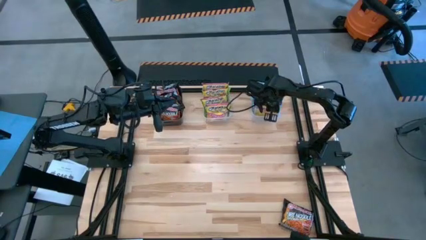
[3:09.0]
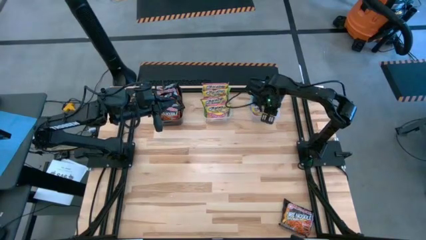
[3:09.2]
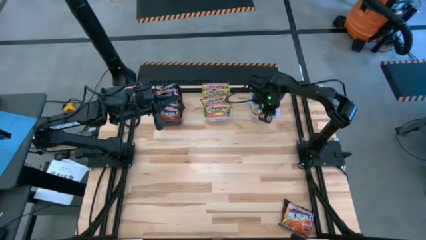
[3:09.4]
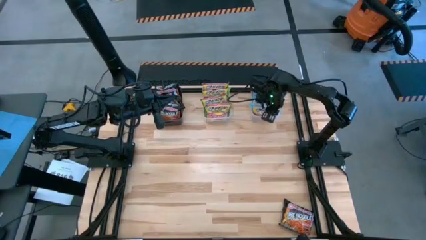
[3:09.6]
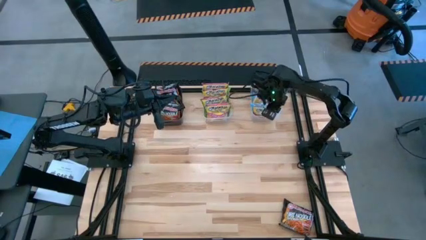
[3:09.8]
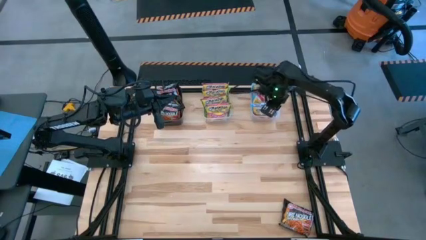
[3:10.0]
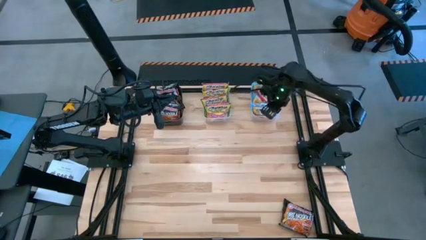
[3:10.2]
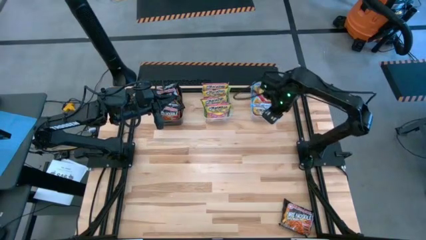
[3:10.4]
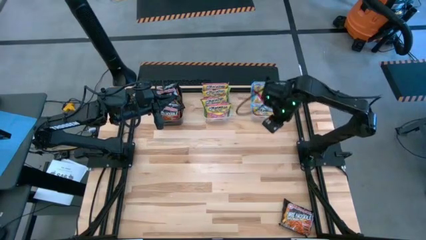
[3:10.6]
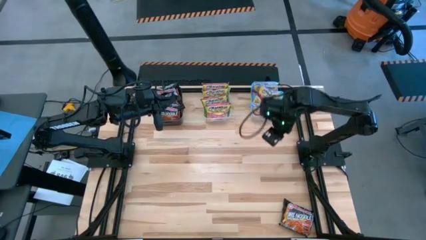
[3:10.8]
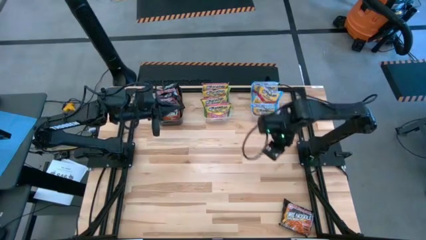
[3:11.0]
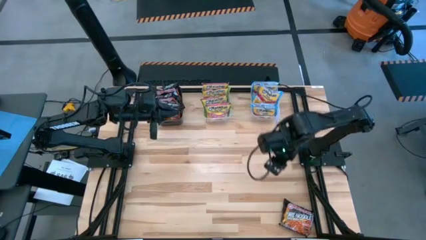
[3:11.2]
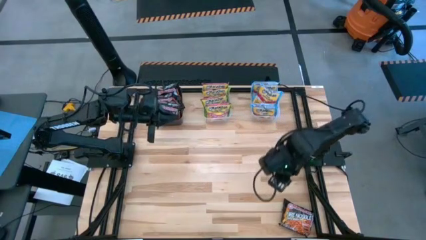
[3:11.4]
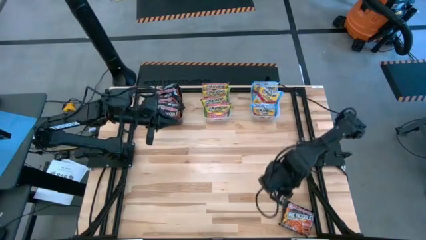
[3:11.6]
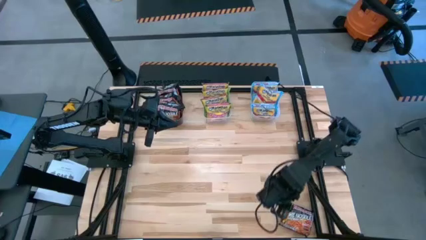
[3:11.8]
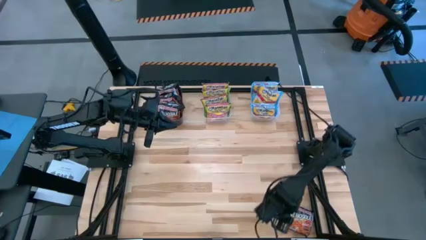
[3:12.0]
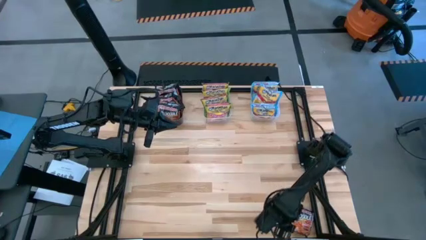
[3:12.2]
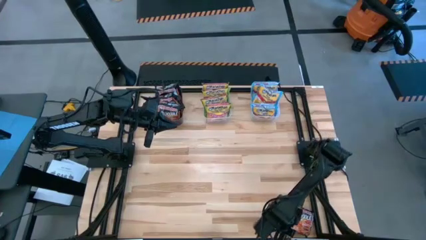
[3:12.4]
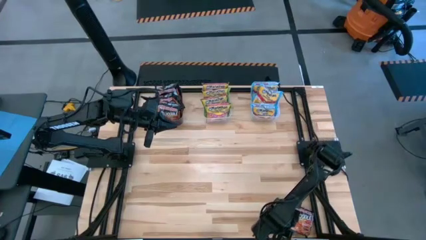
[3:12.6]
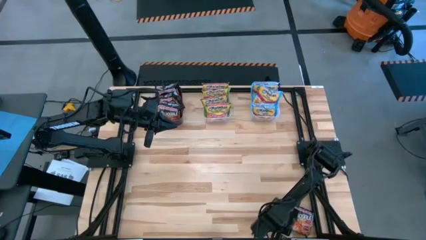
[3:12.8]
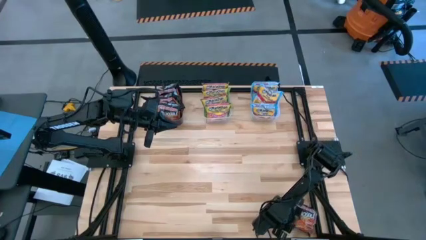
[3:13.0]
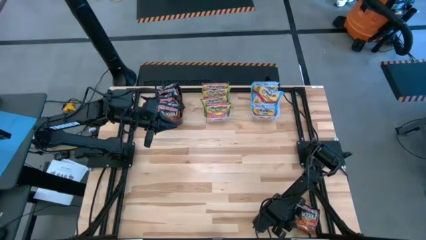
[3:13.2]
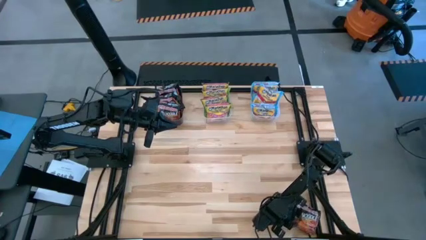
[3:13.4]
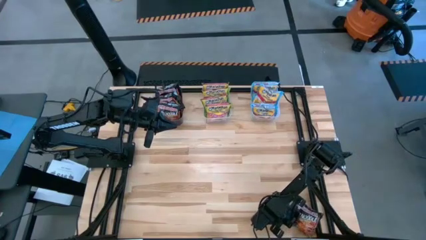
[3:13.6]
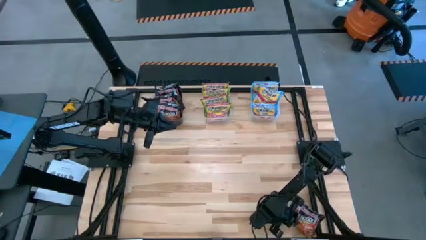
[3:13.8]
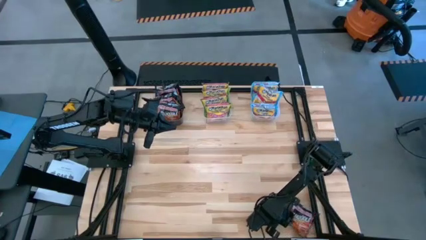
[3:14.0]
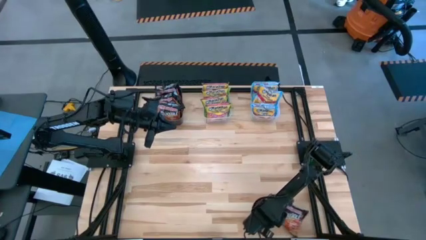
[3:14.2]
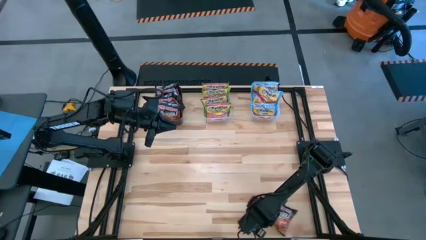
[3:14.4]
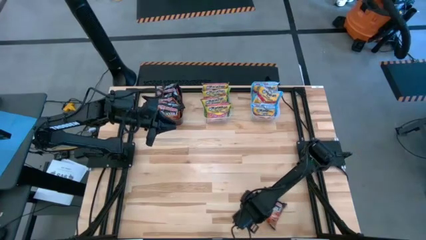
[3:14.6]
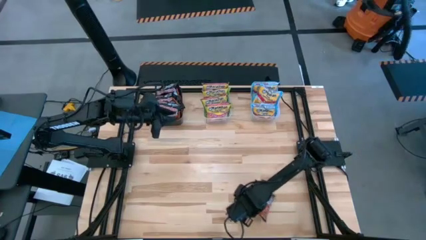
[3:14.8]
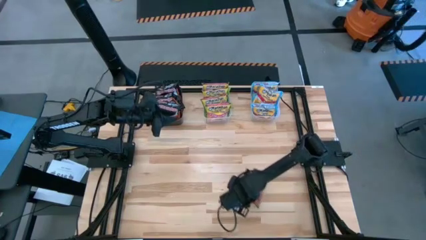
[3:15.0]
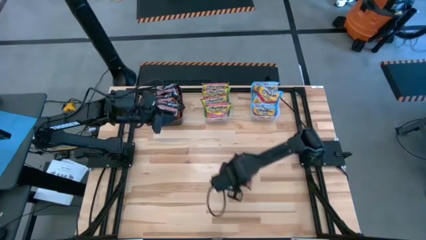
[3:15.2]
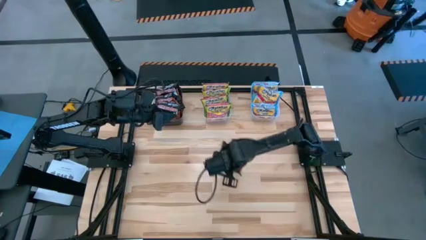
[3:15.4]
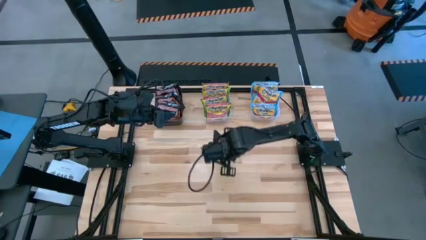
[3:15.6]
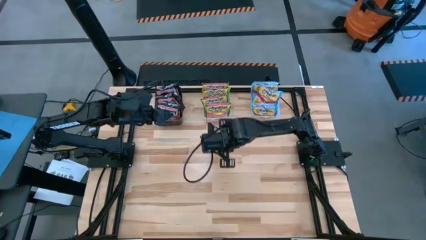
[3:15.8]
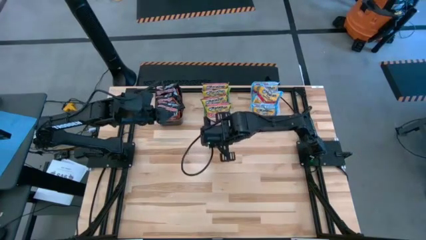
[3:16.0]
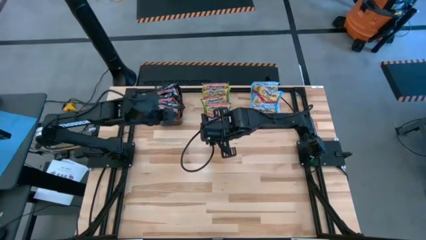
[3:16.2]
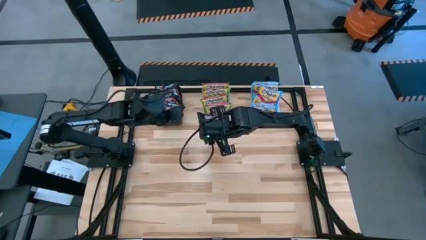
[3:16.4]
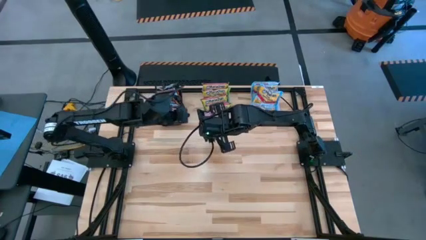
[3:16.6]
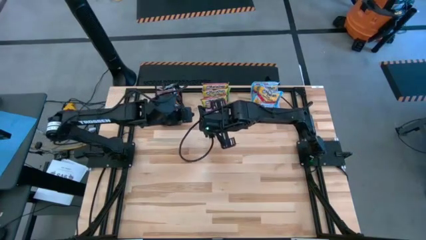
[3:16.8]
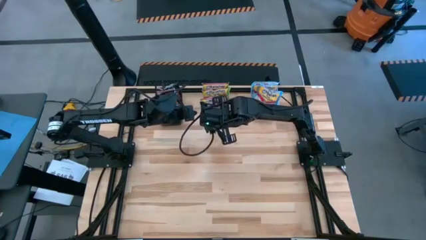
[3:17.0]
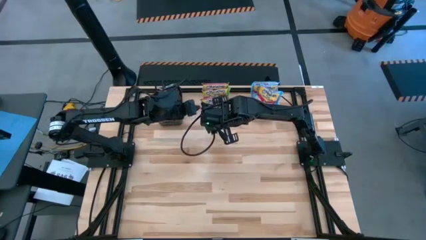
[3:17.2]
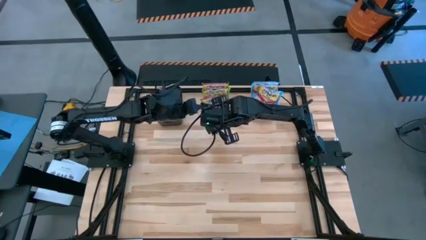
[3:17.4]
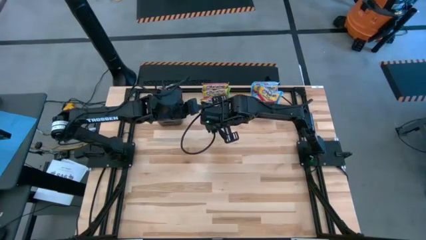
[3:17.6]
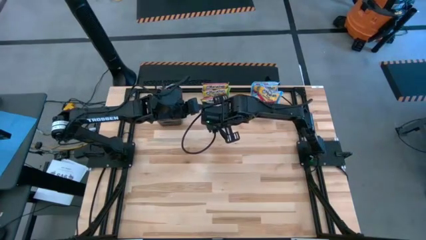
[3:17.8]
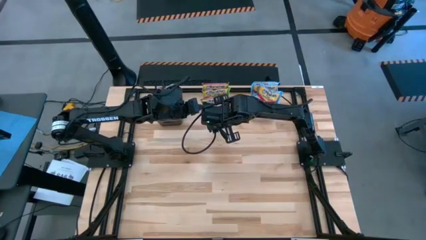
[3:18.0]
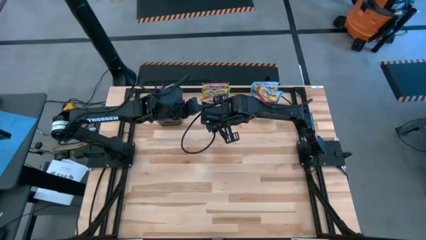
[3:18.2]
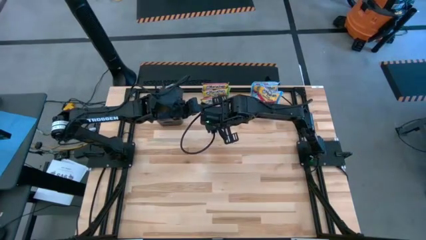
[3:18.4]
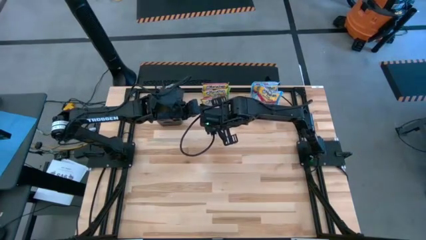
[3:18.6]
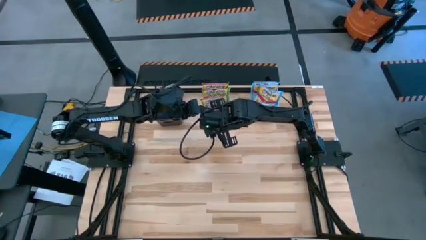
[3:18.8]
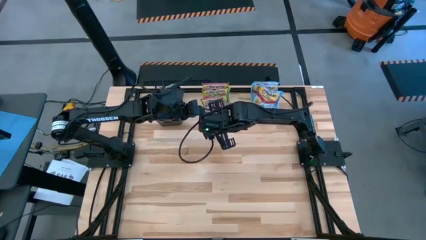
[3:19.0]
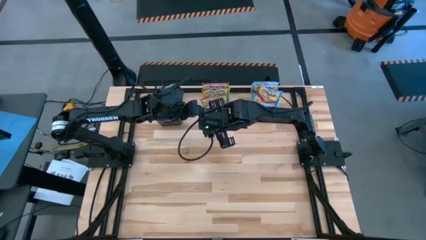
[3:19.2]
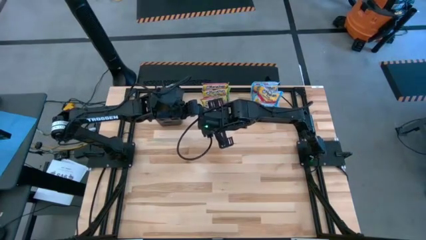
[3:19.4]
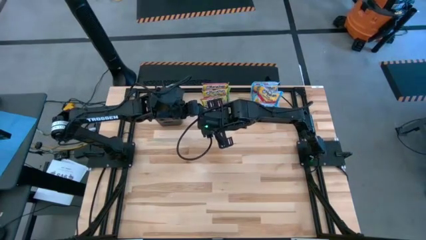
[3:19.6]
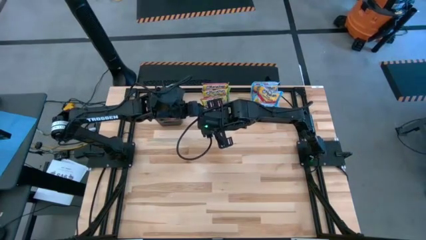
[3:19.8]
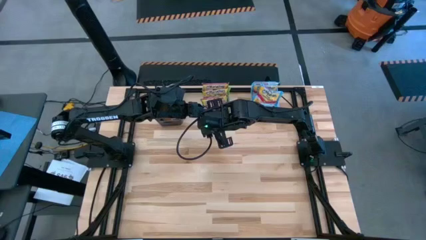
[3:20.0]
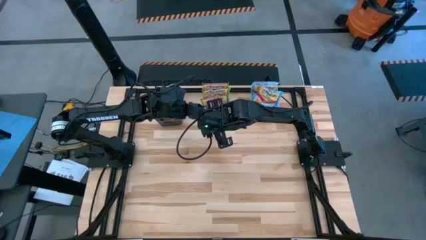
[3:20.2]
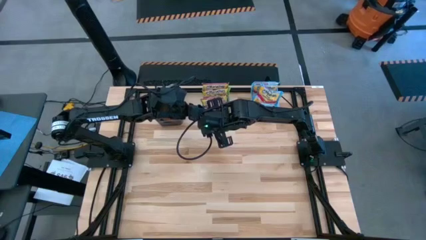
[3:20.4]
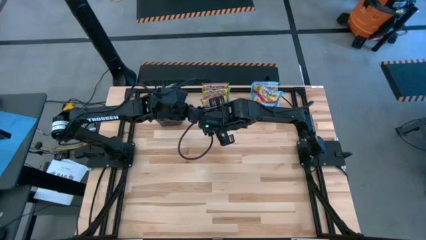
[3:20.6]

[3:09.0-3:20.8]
Task: Sort Maruchan noodles
Put the black noodle pack into the black bin

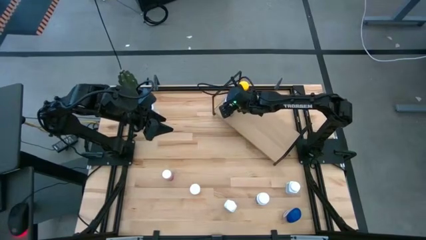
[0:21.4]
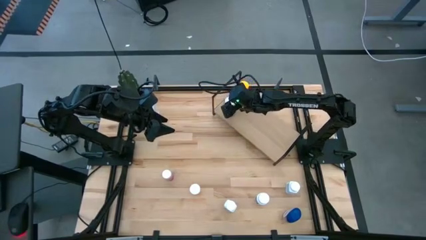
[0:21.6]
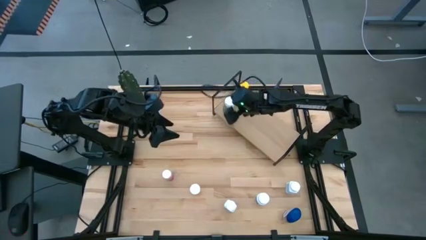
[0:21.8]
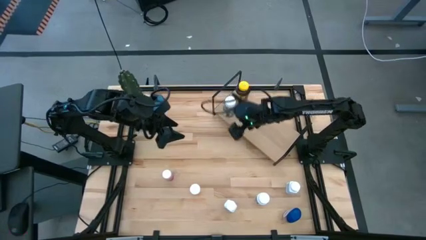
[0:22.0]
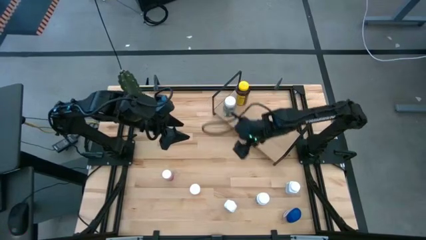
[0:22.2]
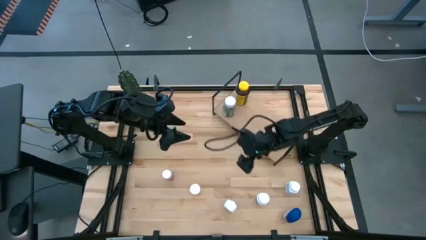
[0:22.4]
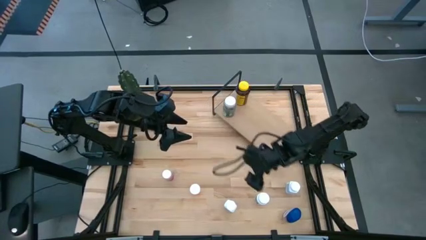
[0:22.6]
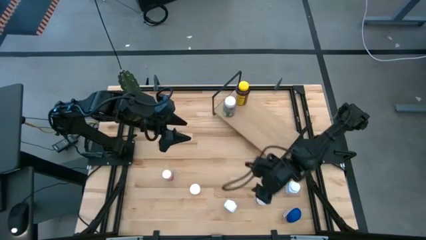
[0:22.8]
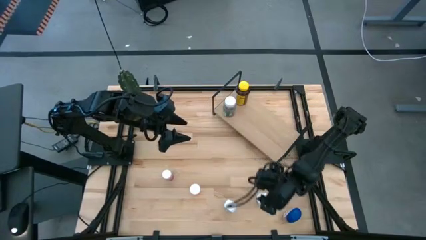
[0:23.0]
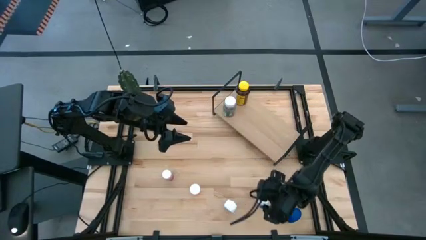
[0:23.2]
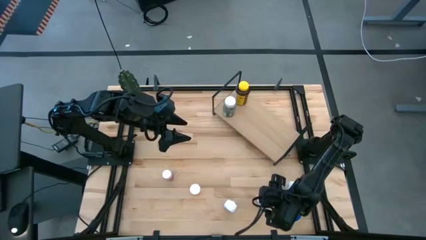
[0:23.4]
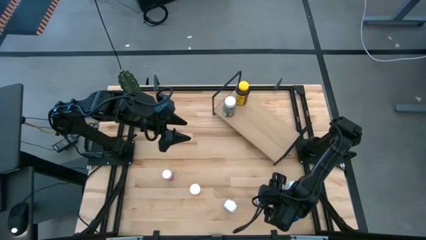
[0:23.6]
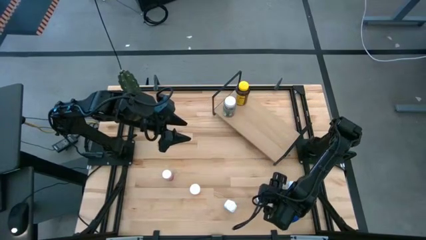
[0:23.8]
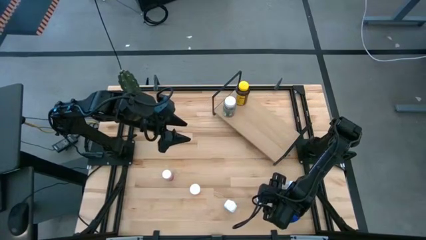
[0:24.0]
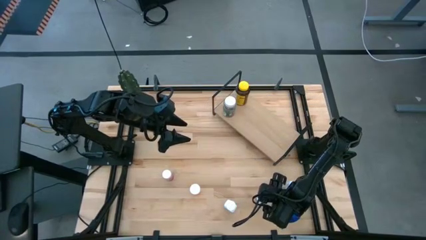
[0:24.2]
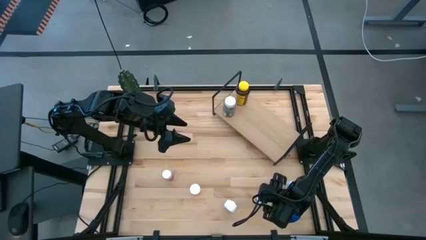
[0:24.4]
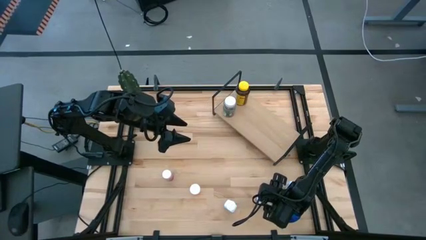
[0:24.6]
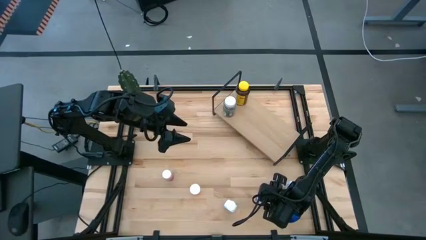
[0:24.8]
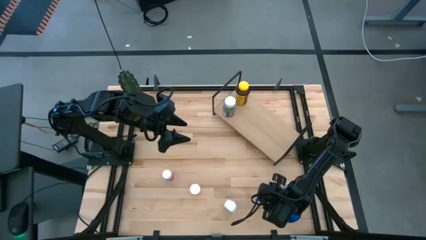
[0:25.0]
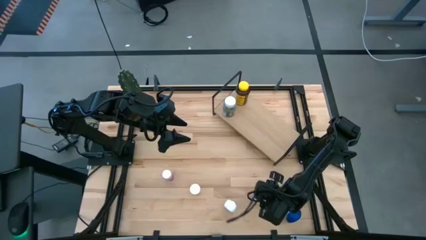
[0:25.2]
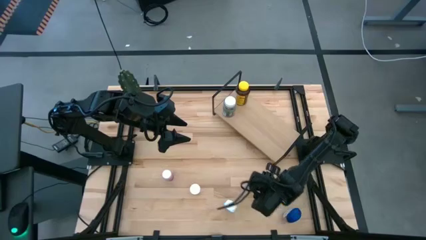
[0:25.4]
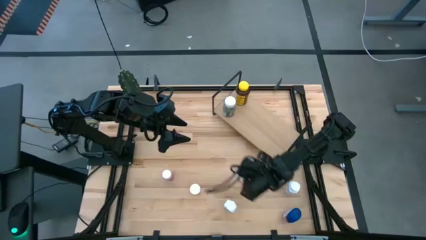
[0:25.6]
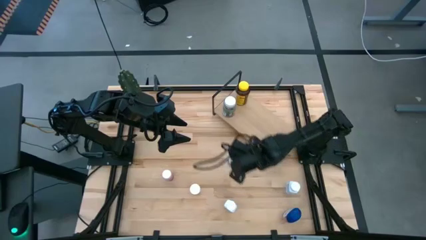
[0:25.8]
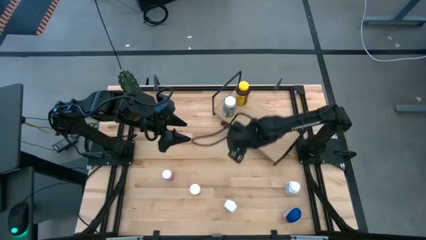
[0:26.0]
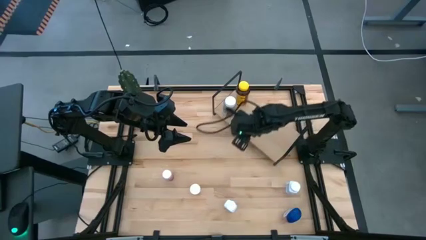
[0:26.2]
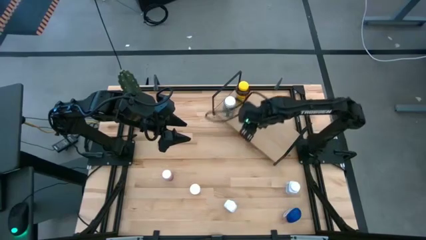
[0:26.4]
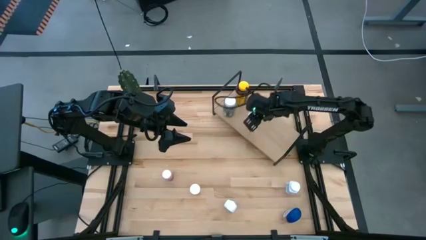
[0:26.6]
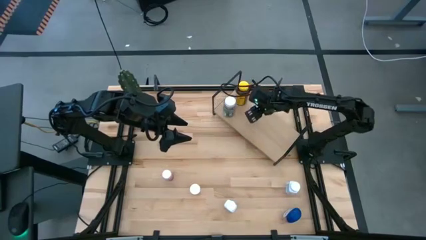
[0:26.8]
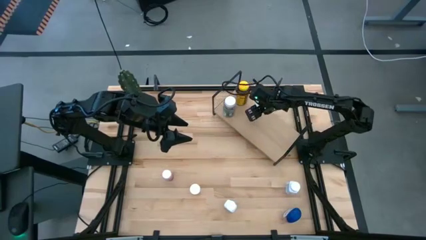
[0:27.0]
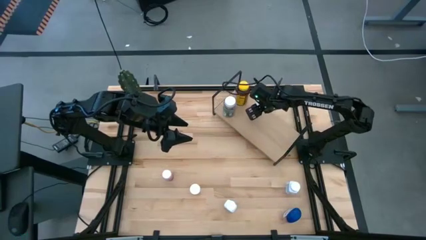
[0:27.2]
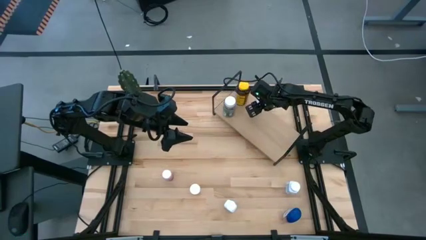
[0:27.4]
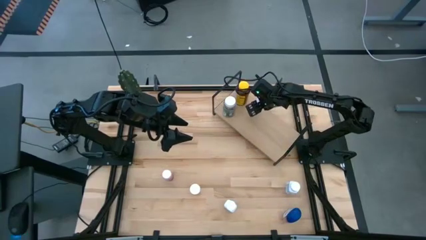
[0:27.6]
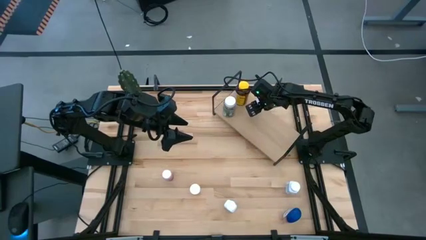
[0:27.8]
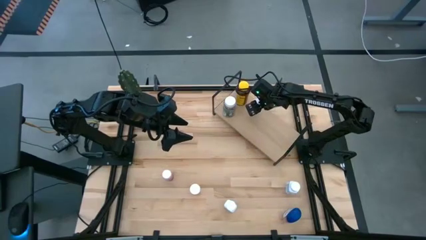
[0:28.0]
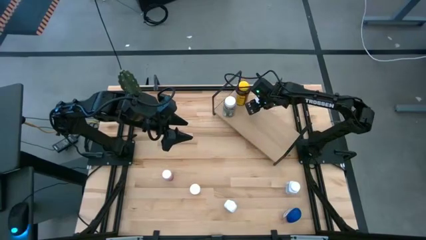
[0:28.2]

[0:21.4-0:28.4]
Task: Pick and place medicine bottles onto shelf by color
Put the white medicine bottle on the shelf
